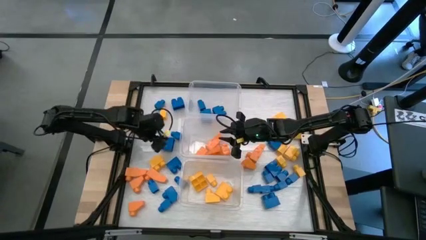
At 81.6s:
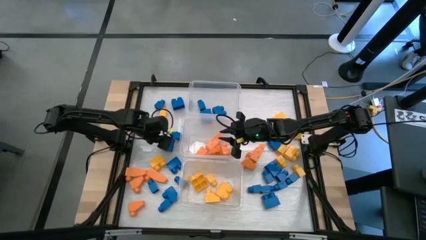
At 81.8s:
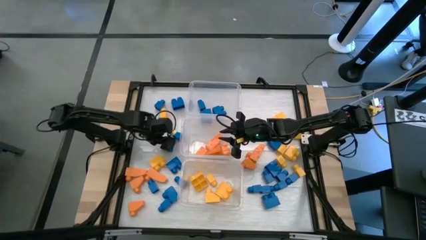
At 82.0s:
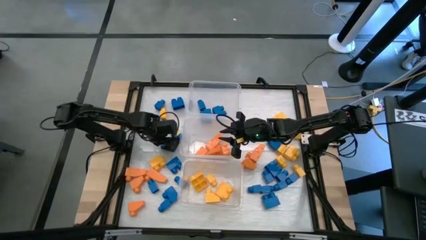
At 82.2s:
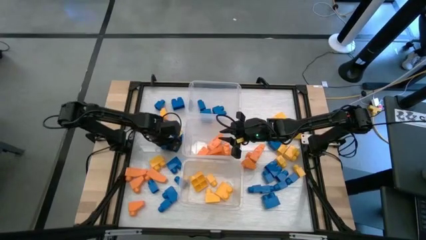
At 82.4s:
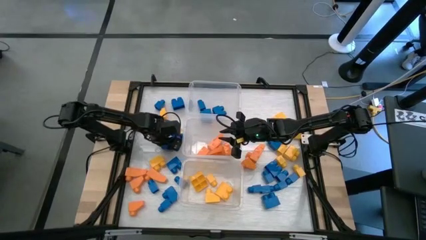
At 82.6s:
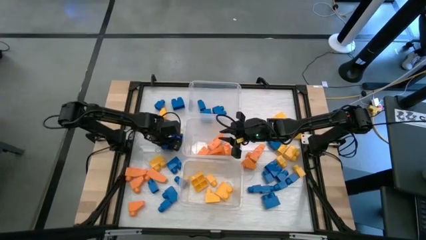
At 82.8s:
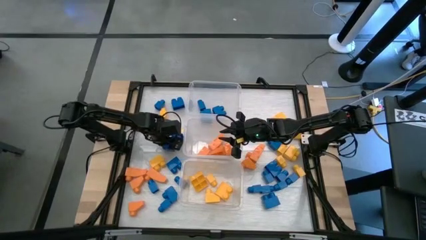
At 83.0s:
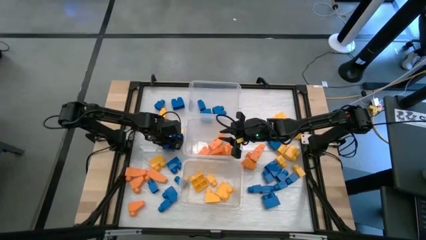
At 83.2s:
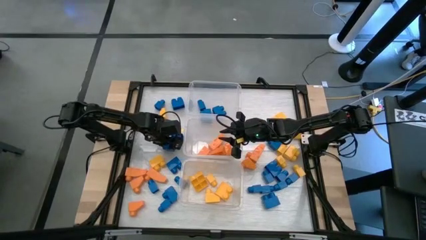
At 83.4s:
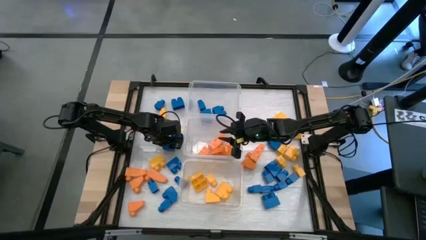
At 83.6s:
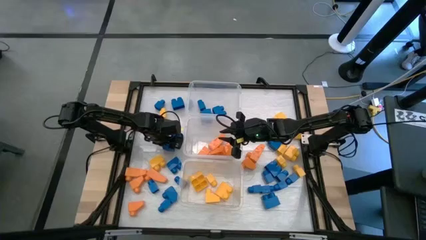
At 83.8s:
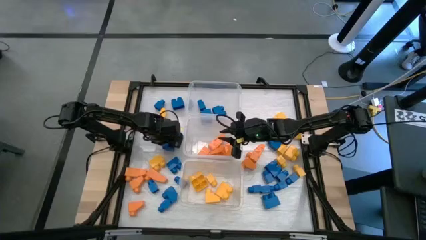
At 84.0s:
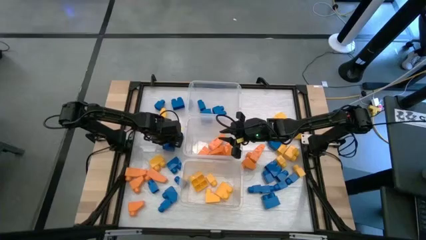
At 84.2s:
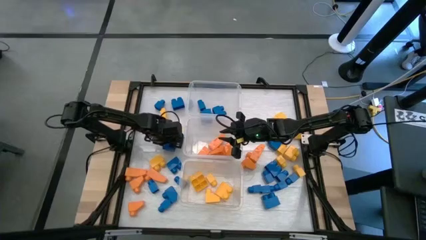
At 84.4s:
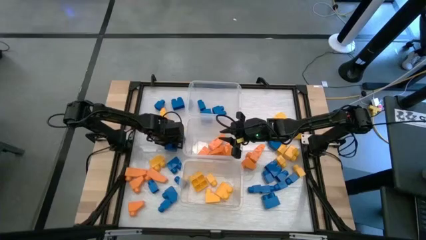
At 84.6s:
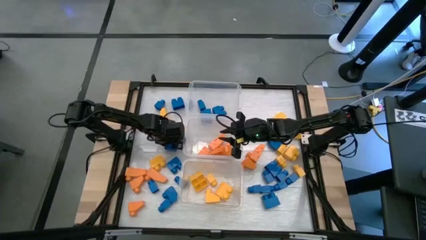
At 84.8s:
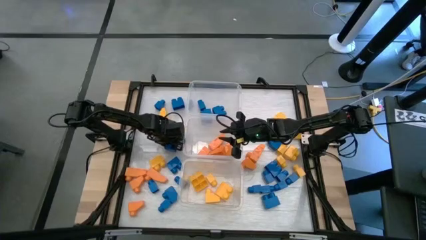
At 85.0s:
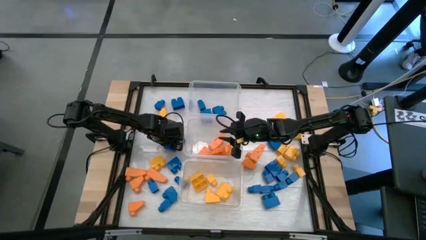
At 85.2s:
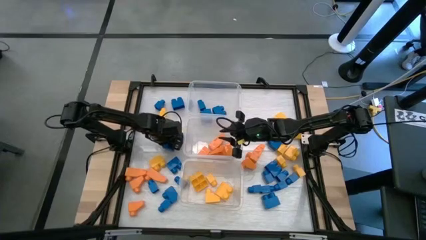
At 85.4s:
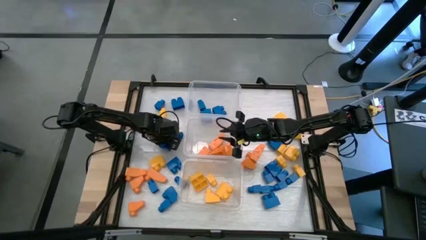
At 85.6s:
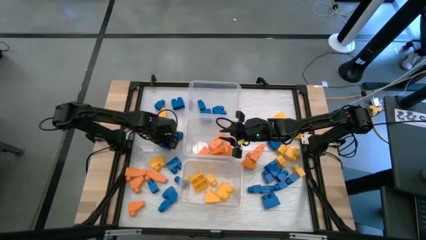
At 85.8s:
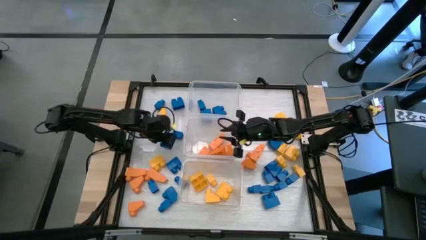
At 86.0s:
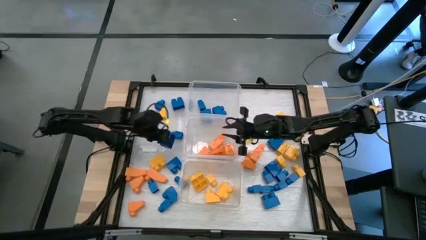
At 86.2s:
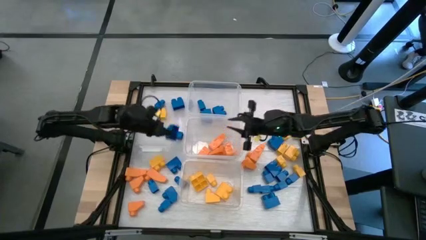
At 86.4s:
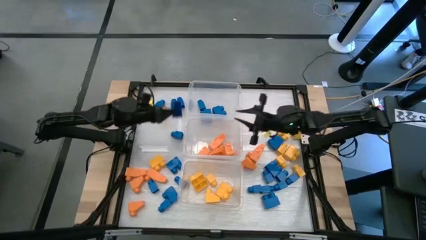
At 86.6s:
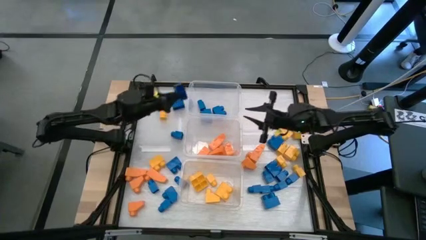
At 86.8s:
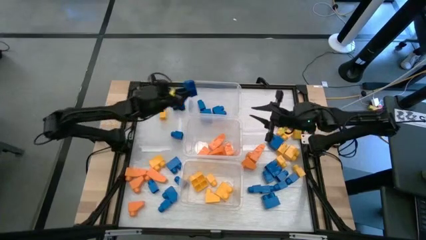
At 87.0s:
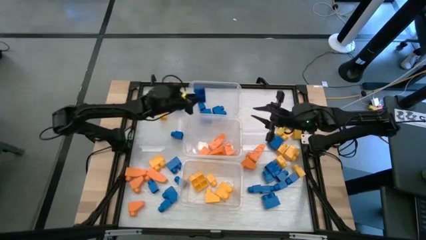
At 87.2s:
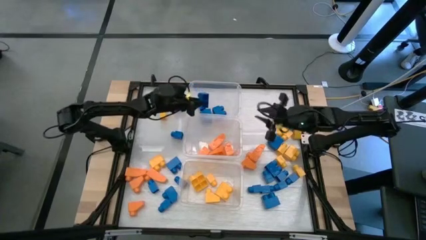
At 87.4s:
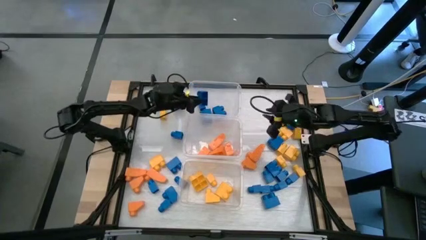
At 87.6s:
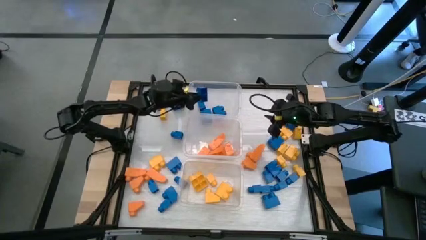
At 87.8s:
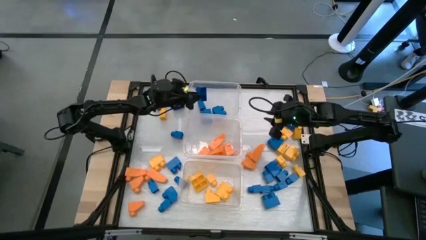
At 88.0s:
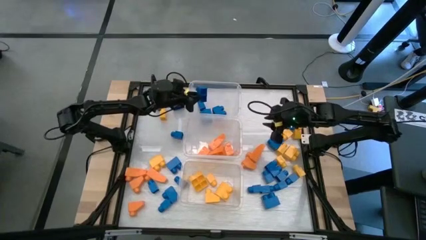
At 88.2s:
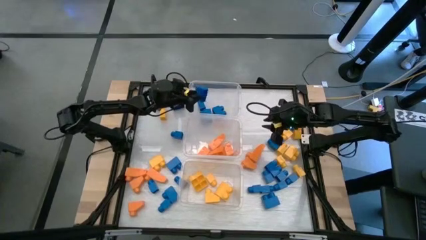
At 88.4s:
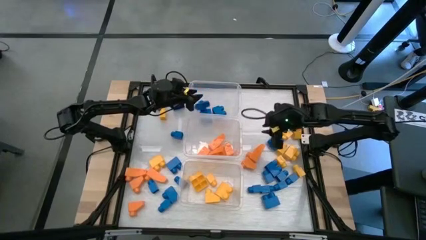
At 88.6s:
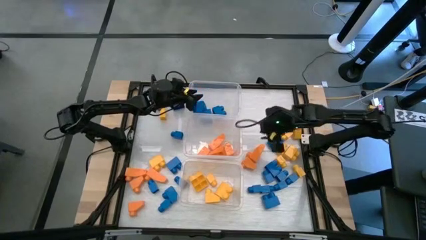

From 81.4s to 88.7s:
Task: Sort blocks
Put the blue game piece into the top transparent bin

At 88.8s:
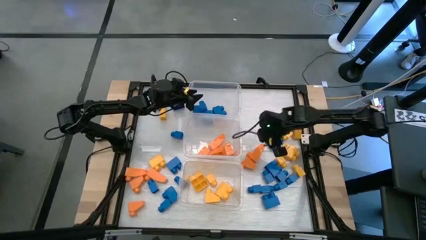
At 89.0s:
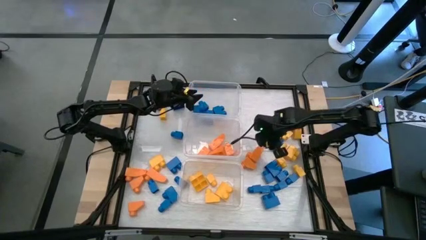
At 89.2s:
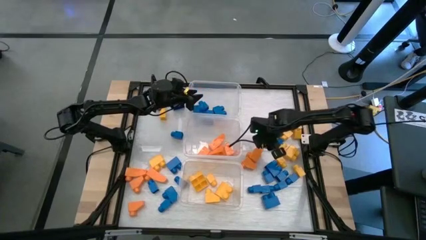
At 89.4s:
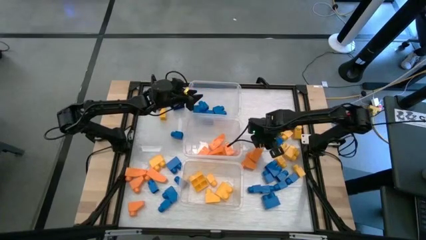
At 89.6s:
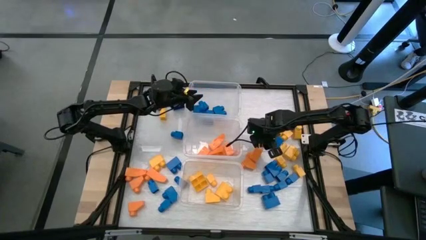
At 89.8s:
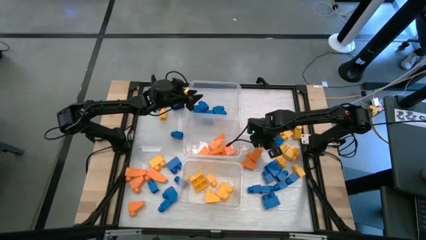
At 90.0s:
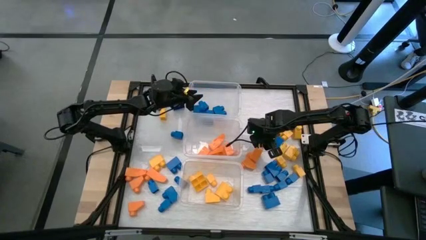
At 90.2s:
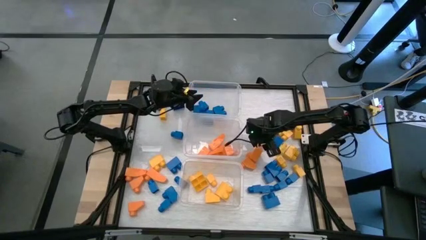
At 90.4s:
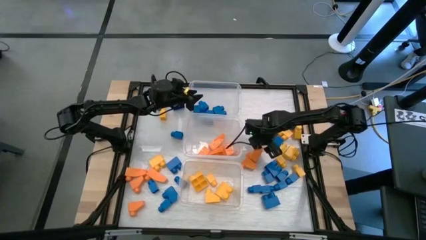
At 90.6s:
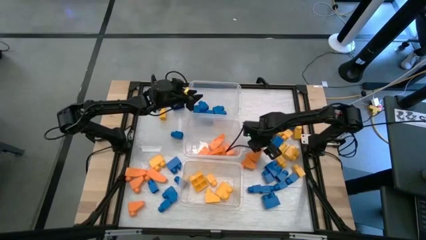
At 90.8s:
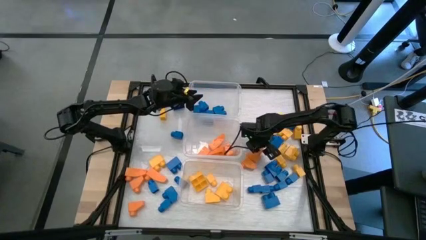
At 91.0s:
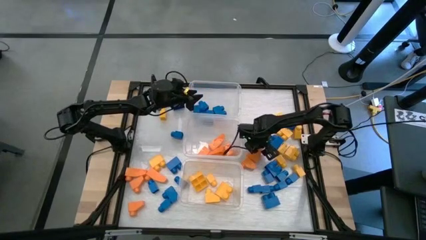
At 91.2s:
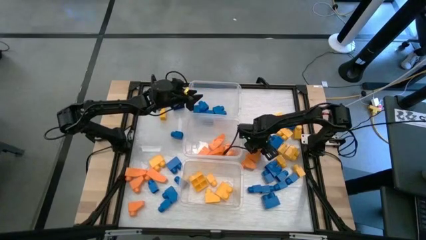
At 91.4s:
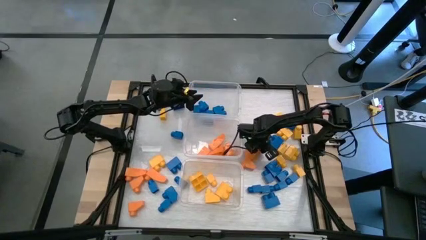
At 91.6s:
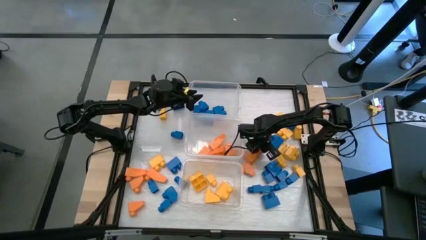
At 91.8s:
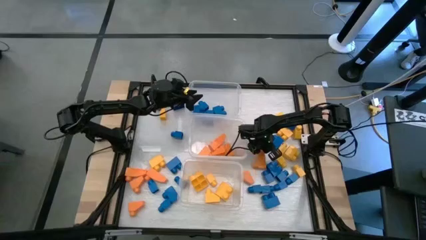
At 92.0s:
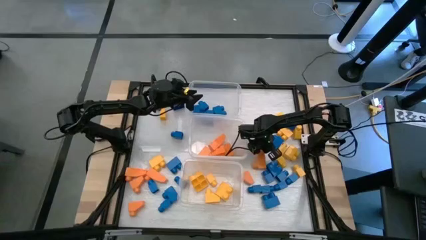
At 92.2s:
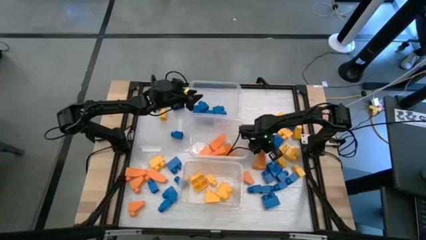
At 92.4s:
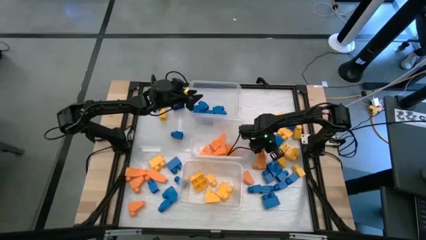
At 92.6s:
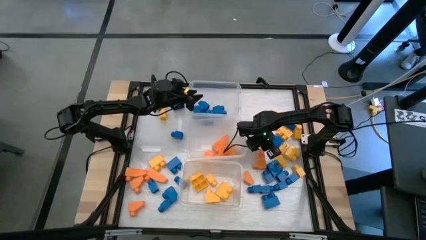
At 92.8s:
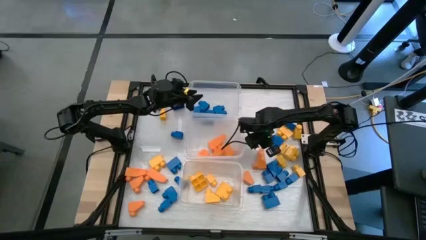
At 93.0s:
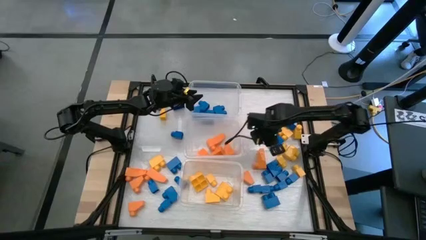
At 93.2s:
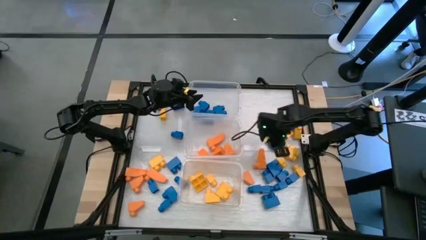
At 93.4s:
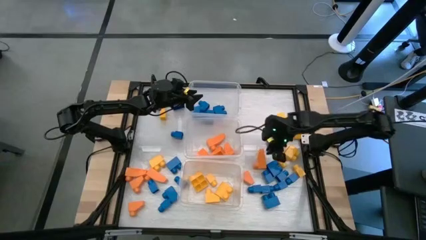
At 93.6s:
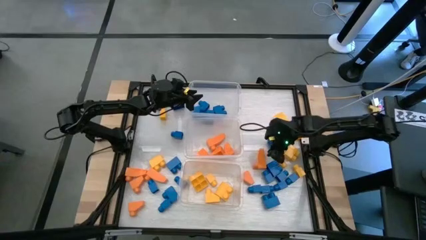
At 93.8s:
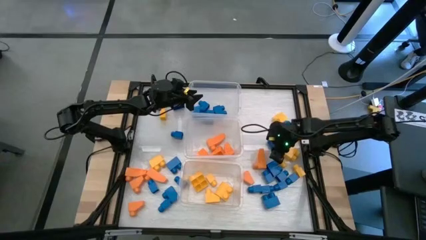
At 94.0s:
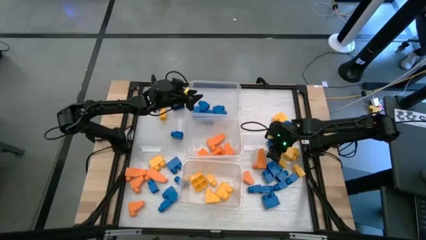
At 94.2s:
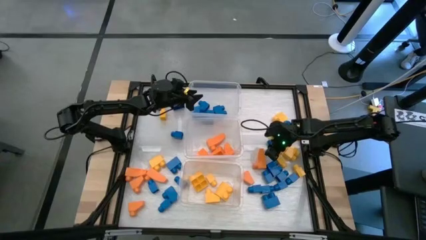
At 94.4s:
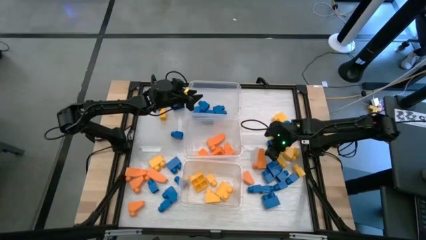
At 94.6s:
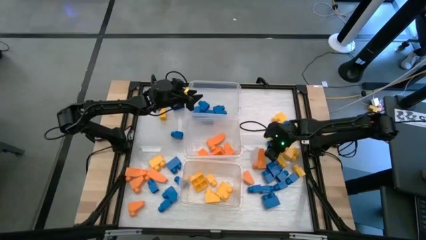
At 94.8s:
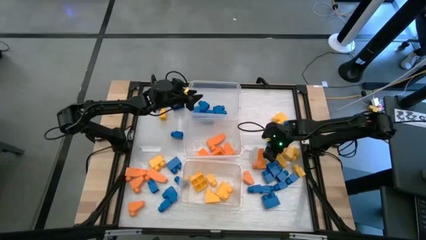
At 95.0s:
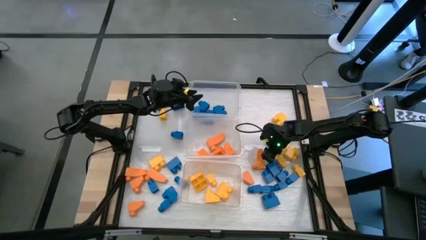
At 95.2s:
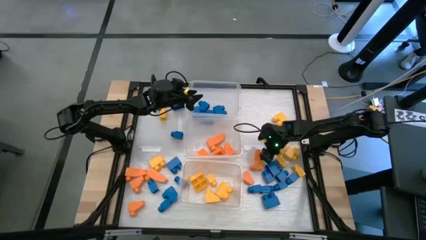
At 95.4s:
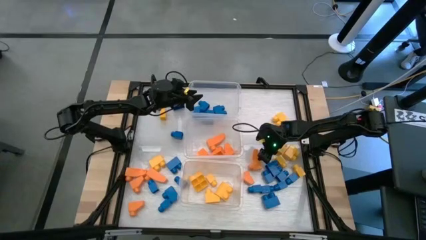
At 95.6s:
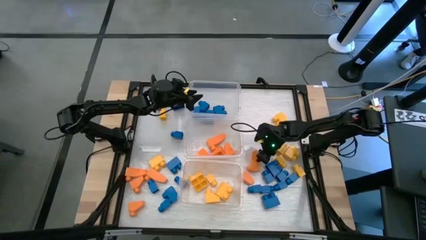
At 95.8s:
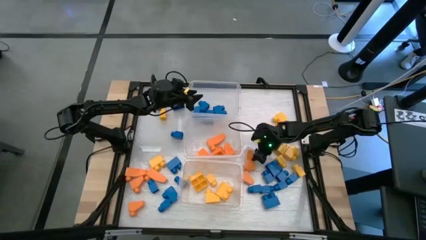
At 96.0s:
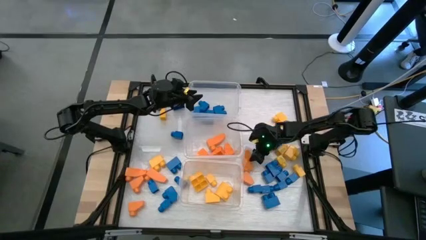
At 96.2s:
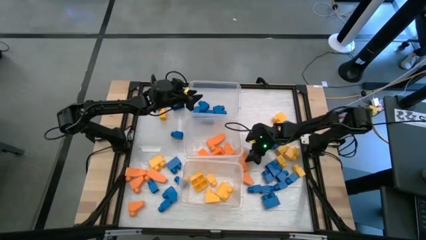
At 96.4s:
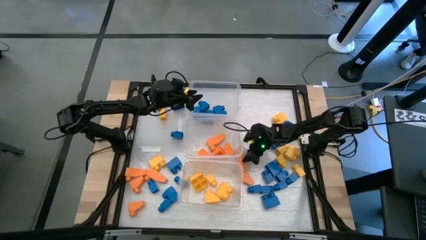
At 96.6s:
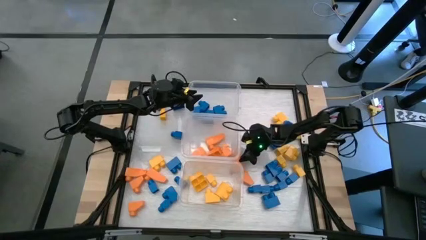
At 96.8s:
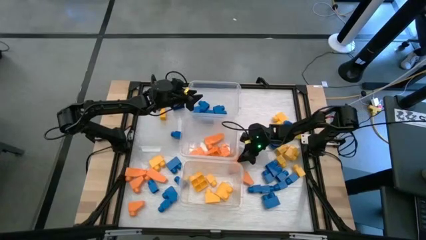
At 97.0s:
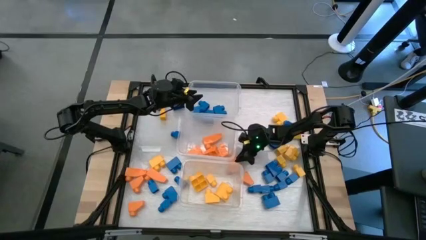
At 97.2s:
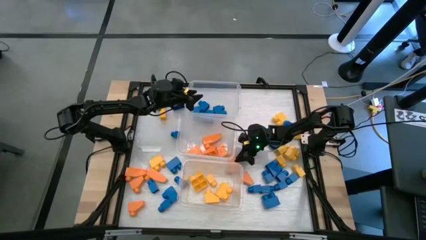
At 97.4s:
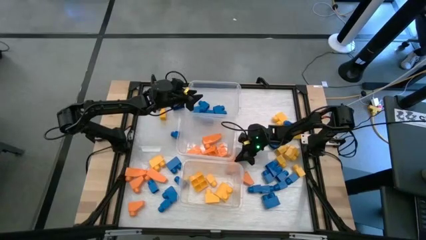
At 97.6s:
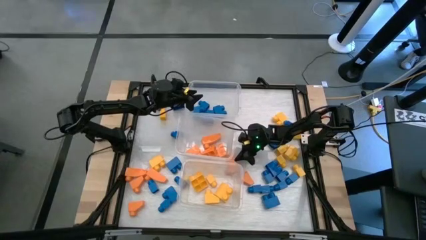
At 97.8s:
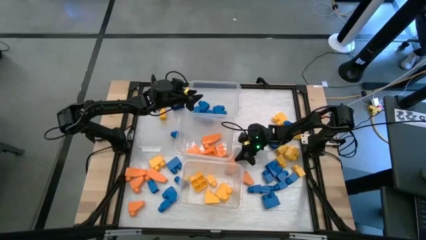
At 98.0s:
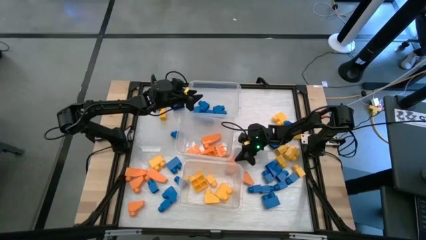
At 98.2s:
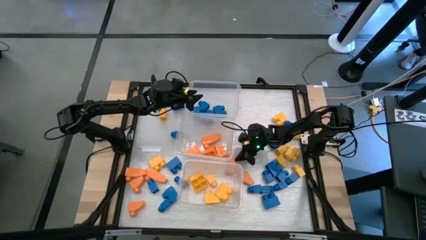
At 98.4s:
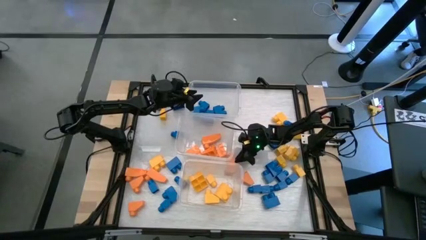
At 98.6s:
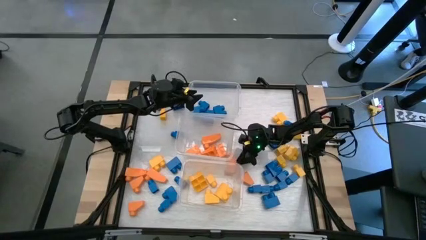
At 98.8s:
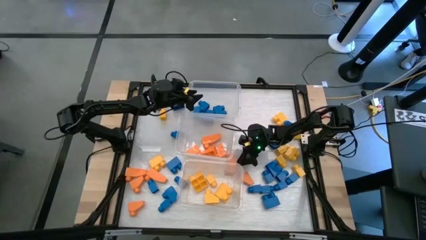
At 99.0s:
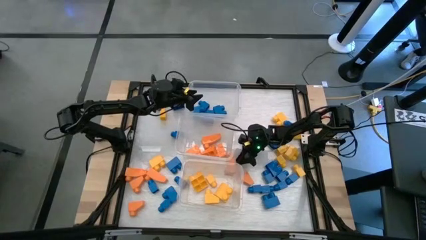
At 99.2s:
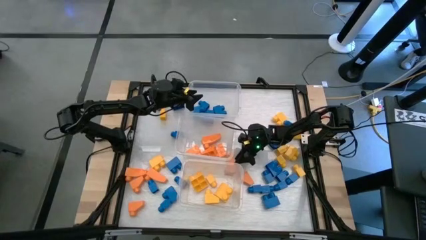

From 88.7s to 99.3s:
Put the orange game piece into the middle transparent bin
